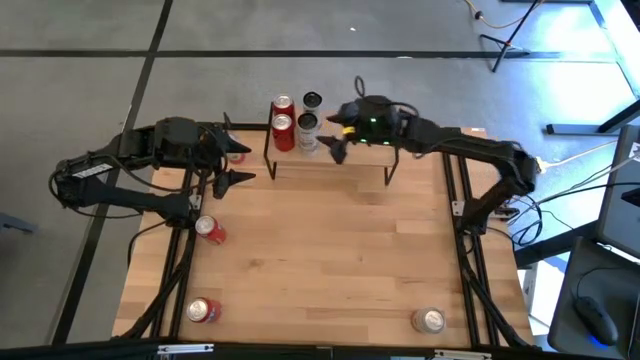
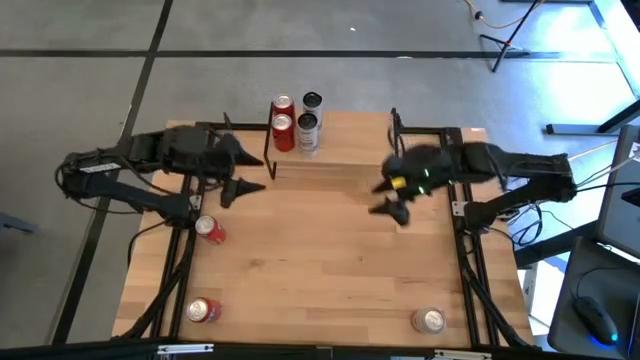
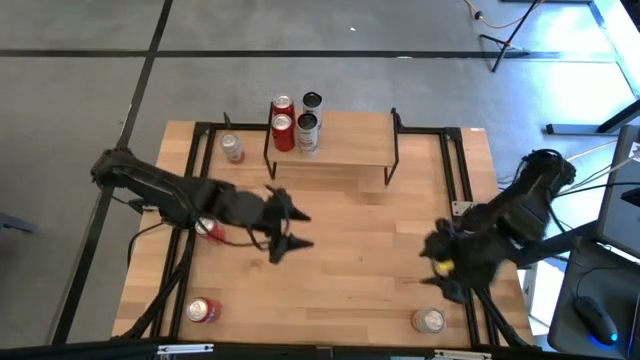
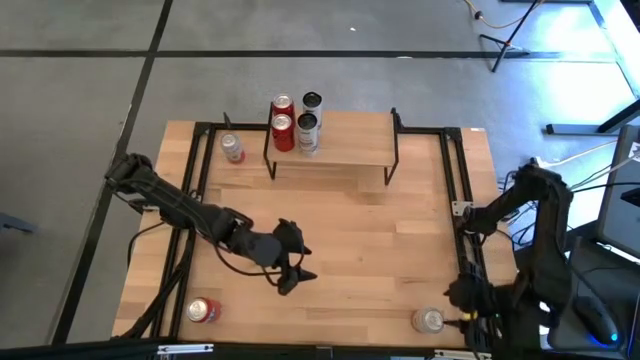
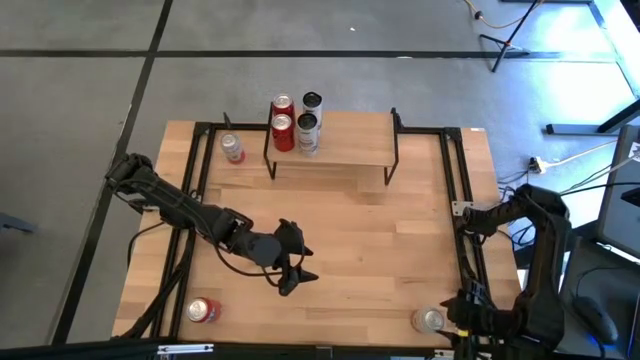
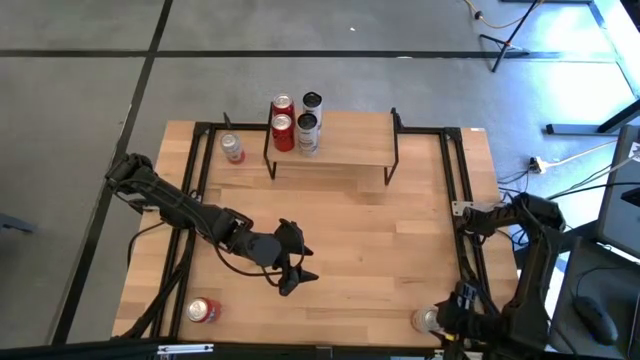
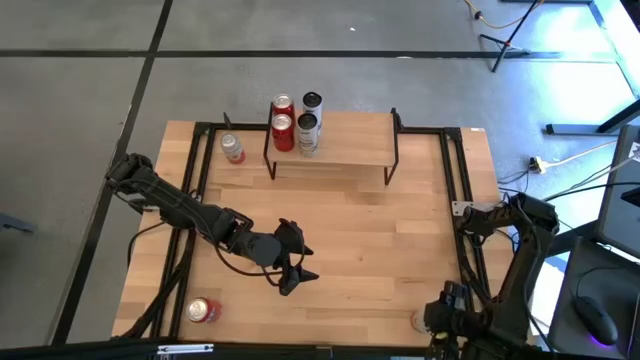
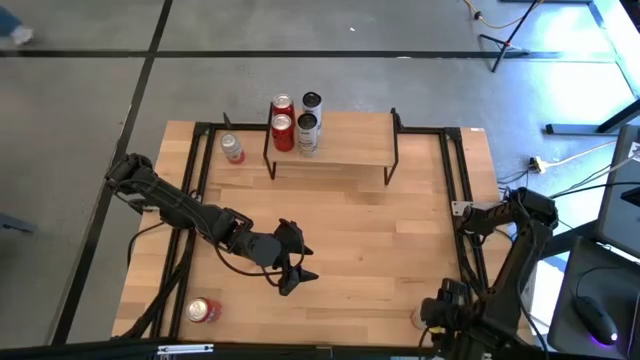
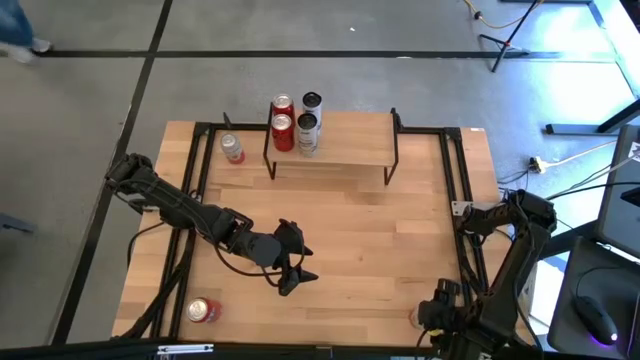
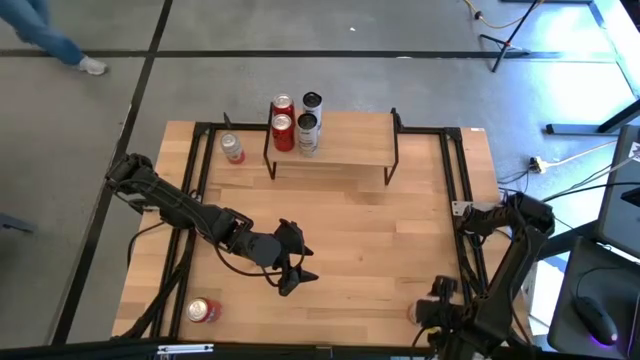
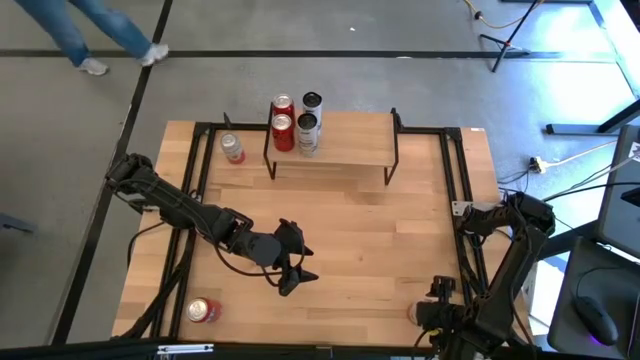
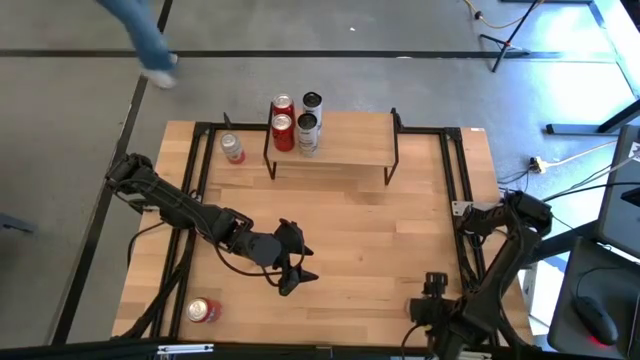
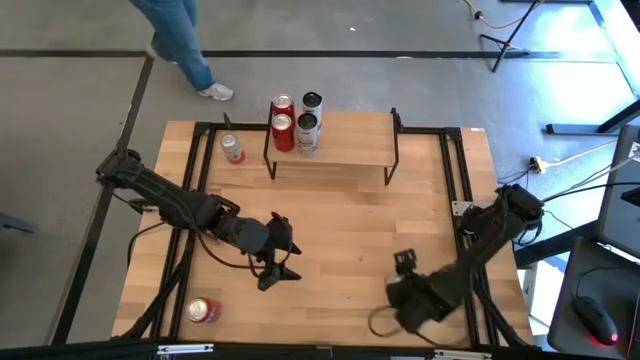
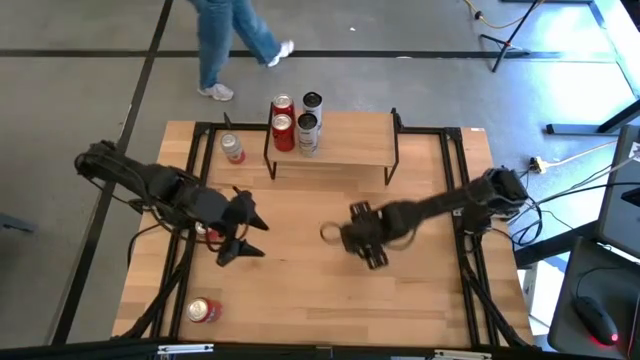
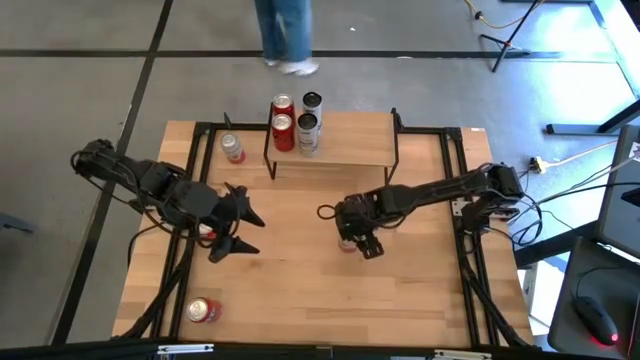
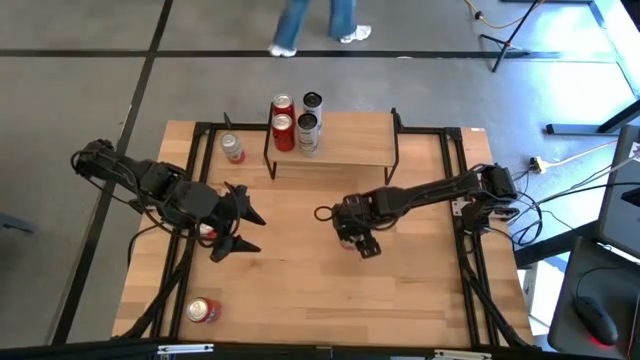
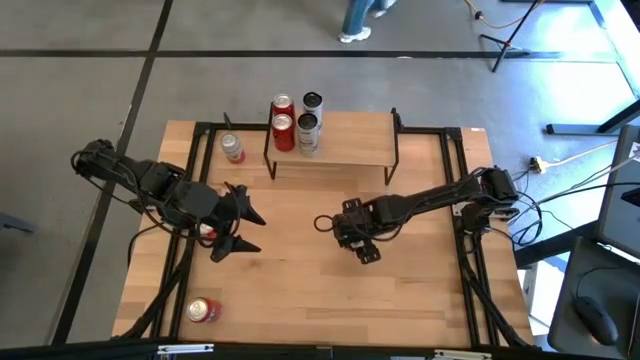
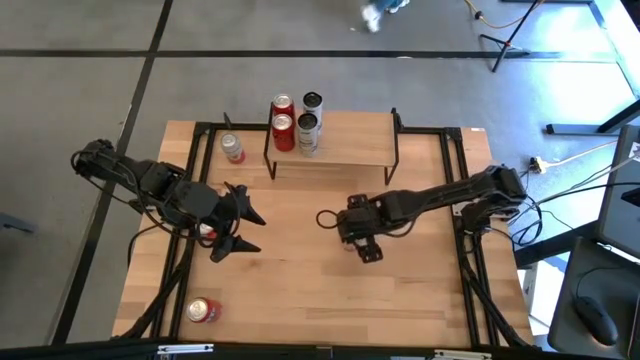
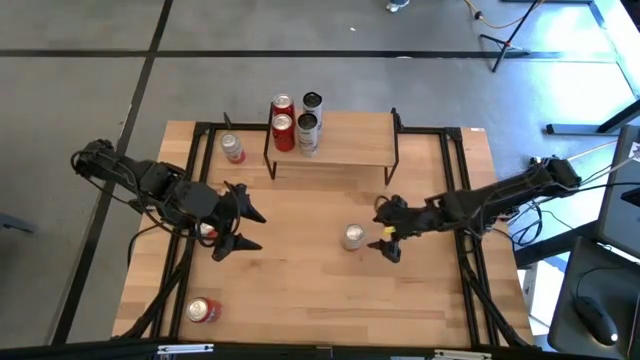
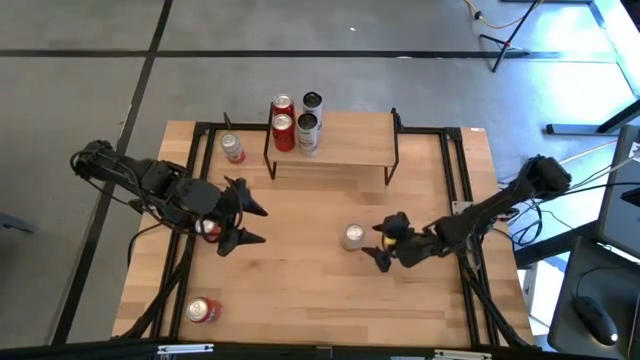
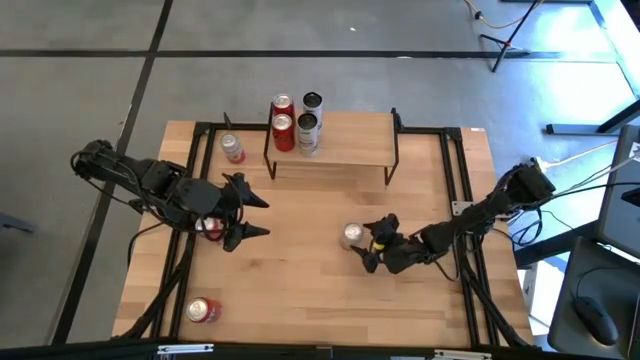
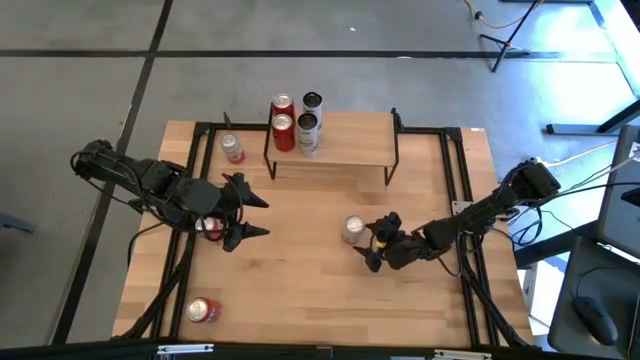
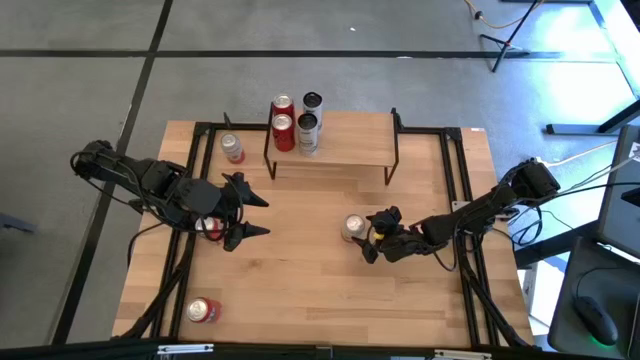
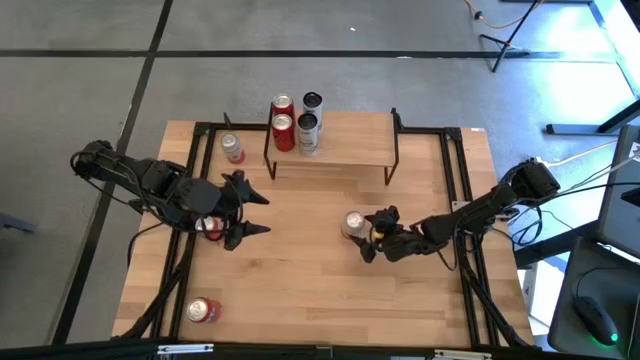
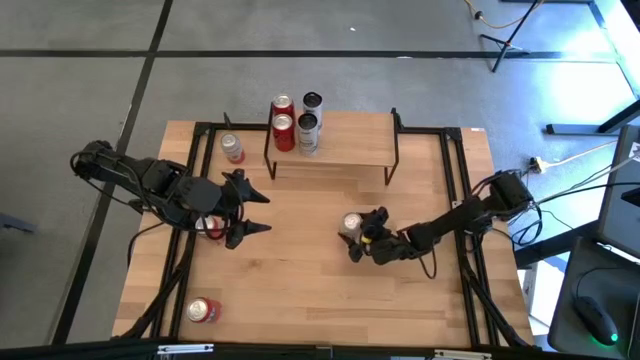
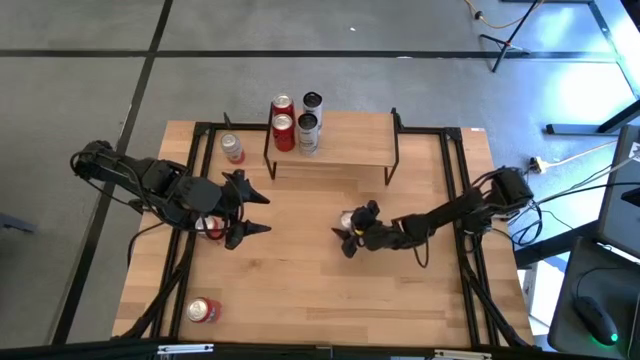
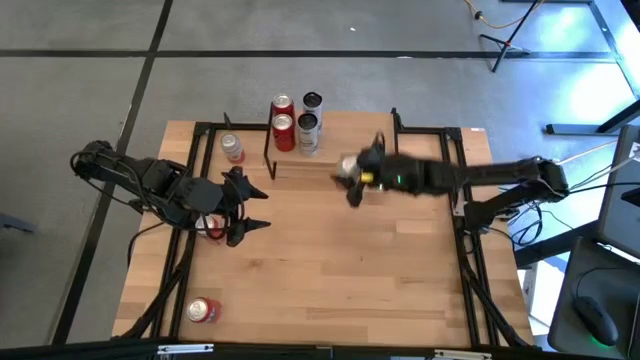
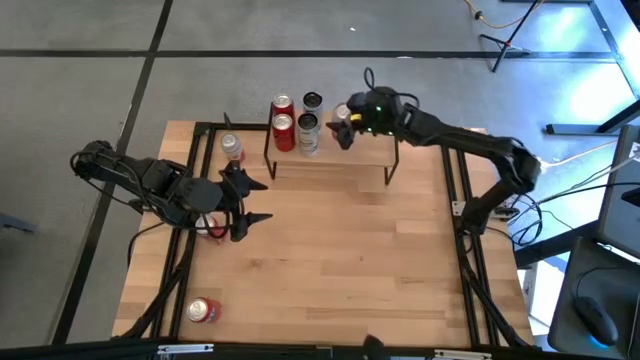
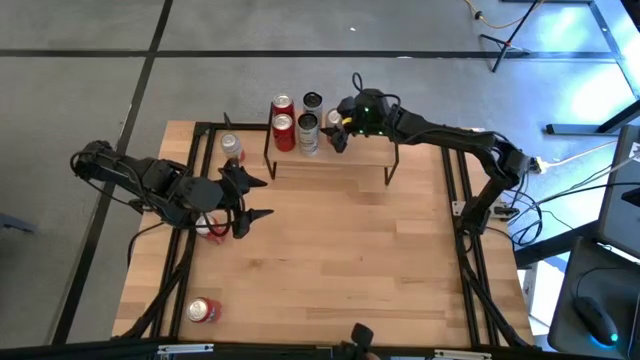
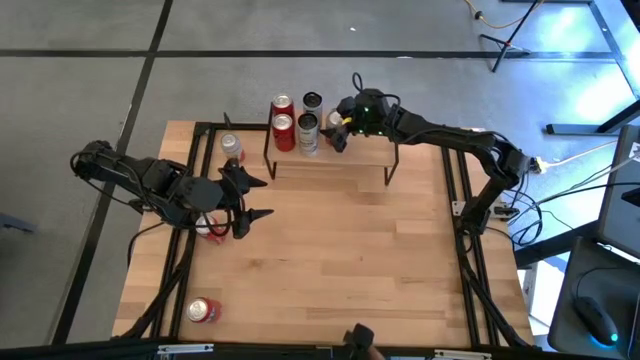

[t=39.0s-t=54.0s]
Task: Place canned beverage on shelf
Put the bottom pink soda can on the shelf

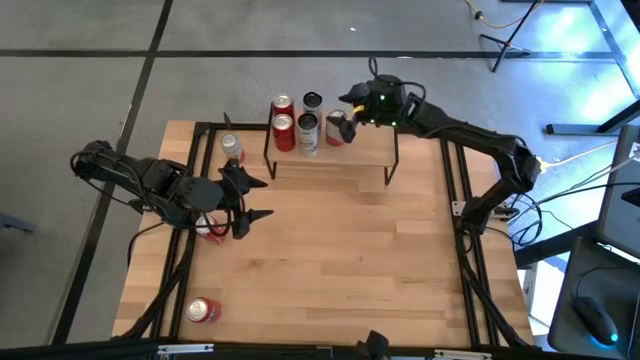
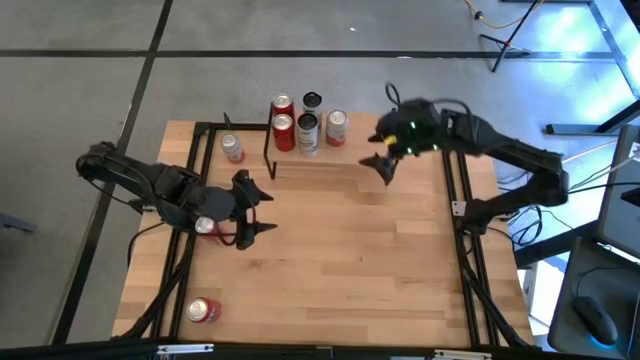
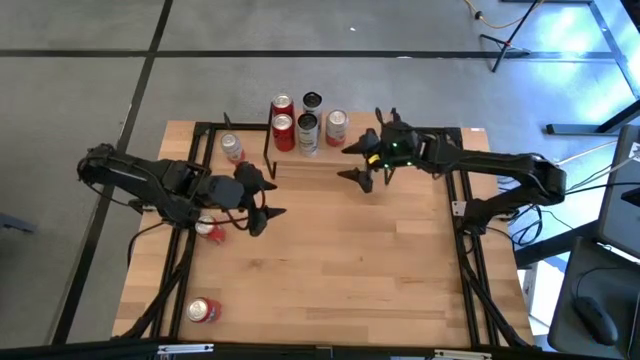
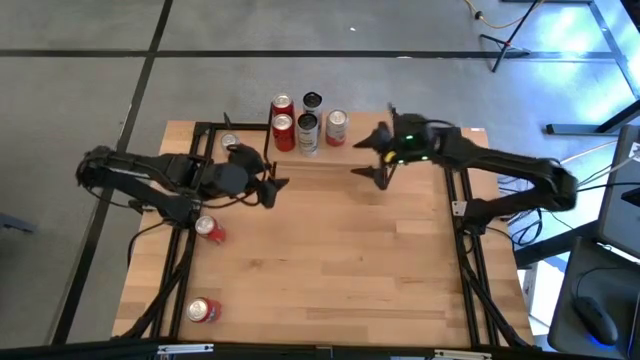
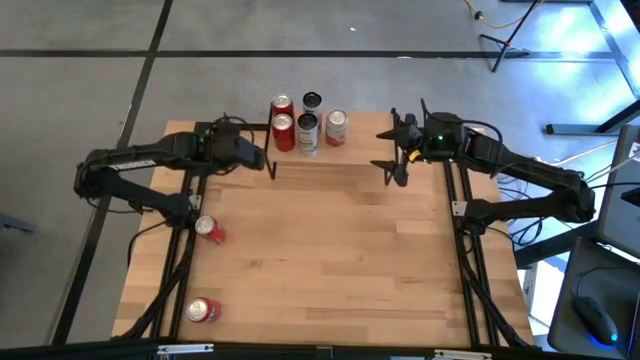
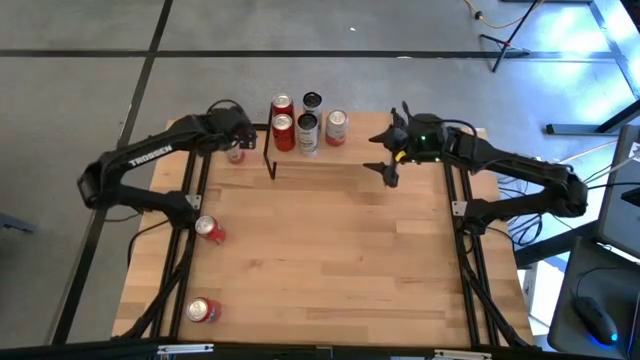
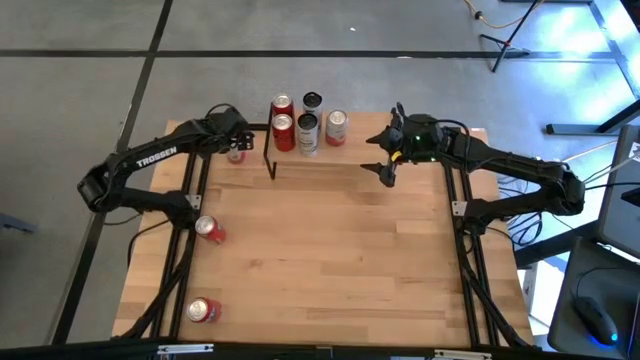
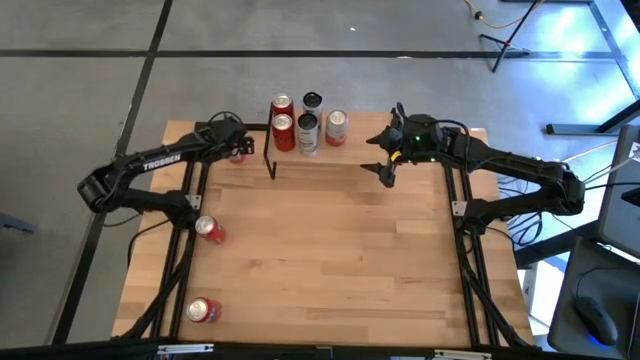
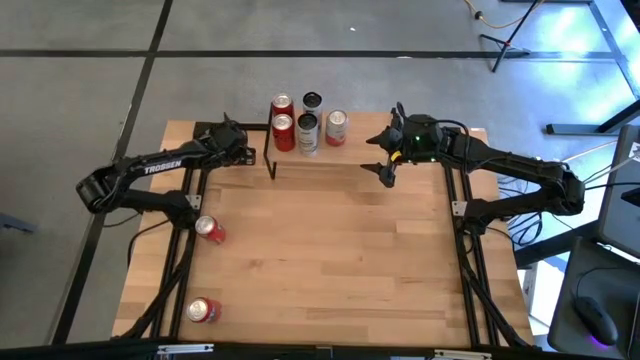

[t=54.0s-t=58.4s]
Put the pink soda can on the shelf aligned with the other pink soda can

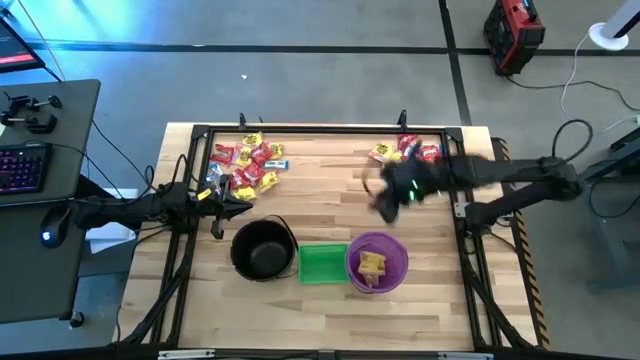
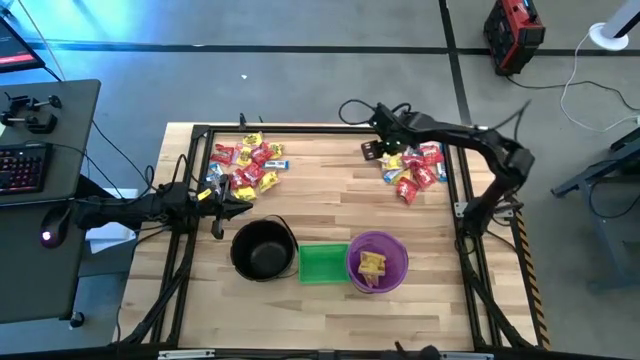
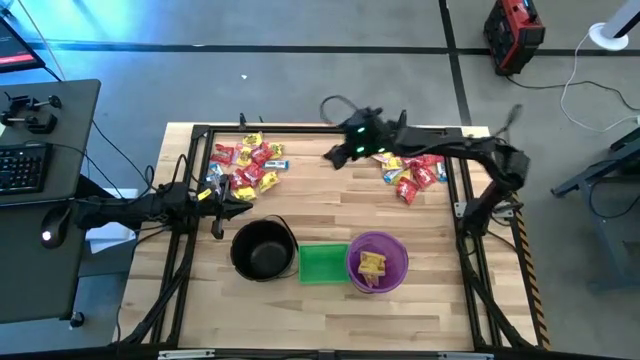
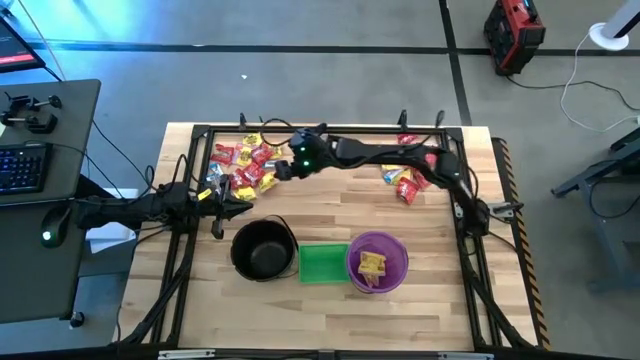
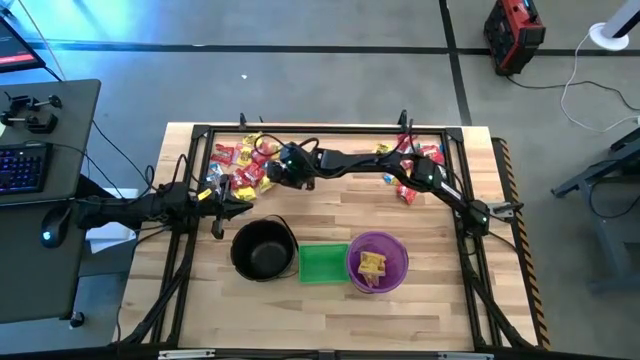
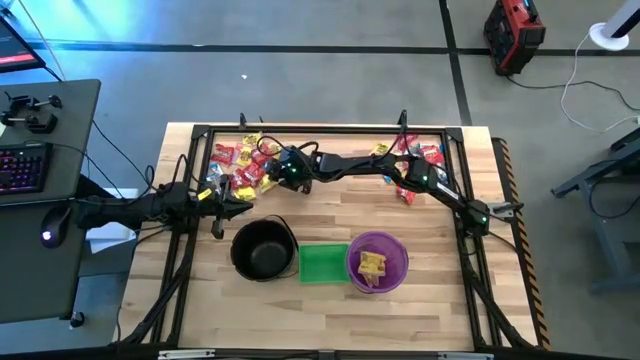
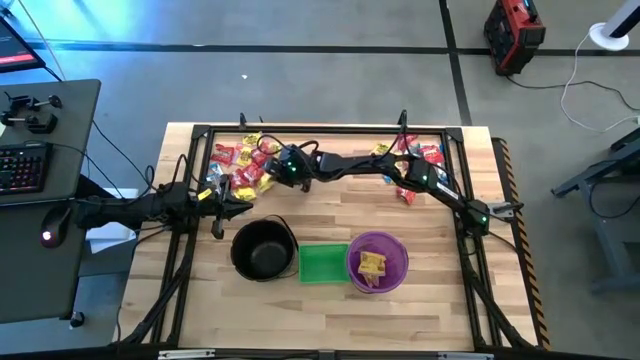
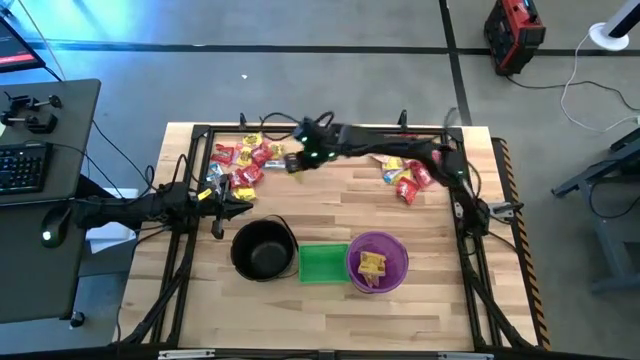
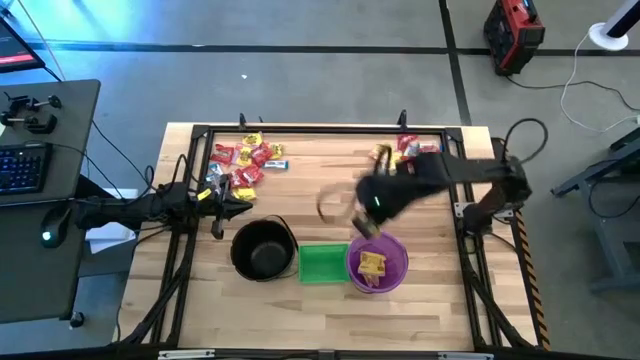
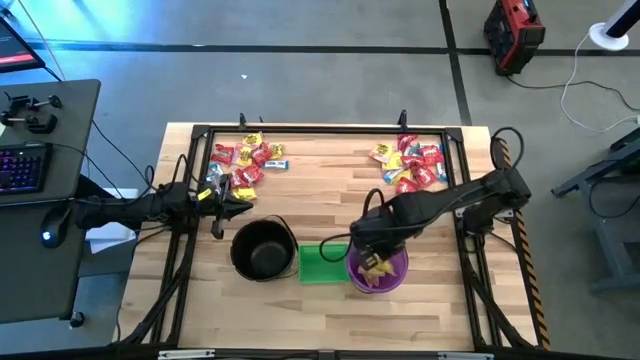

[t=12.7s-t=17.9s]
Task: Sort candy by brand, put in halloween buckets
Put the yellow candy into the violet bucket
